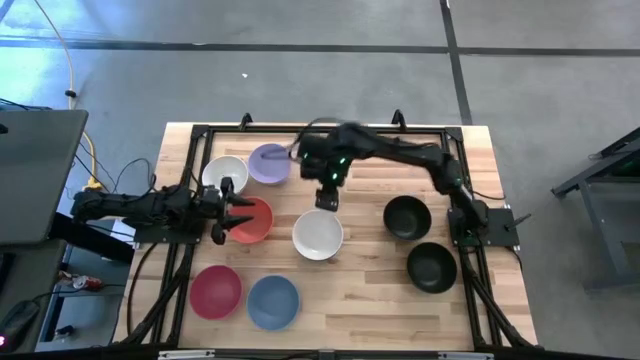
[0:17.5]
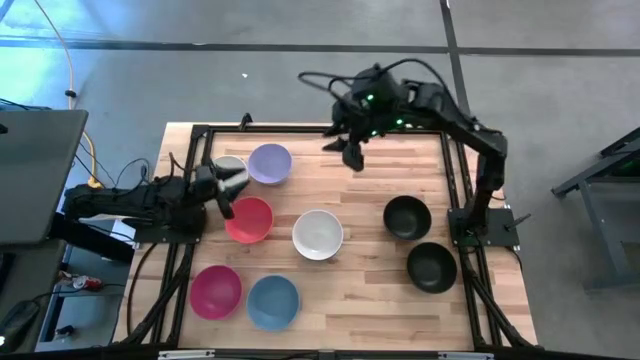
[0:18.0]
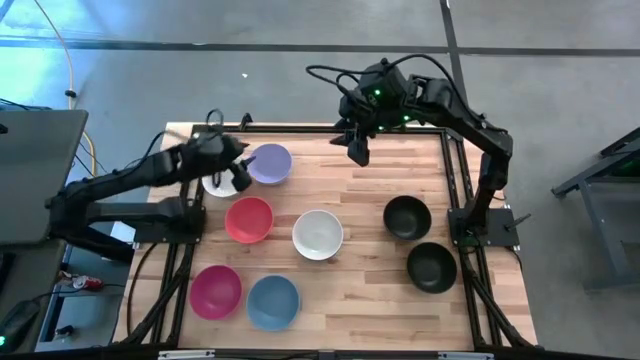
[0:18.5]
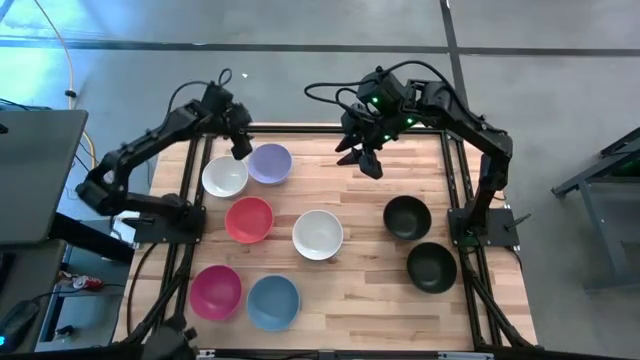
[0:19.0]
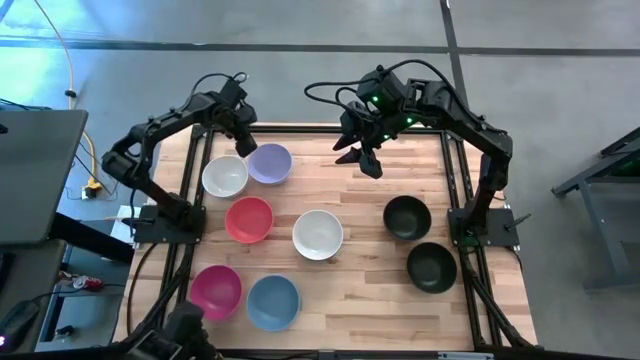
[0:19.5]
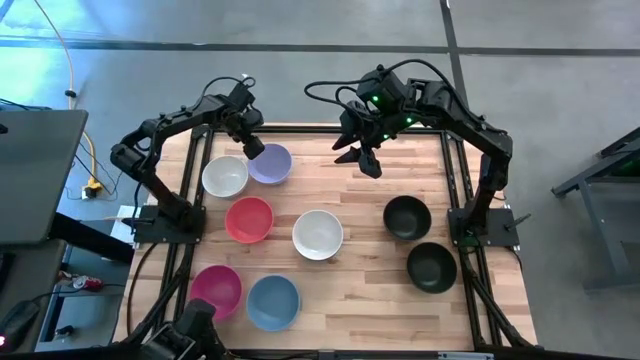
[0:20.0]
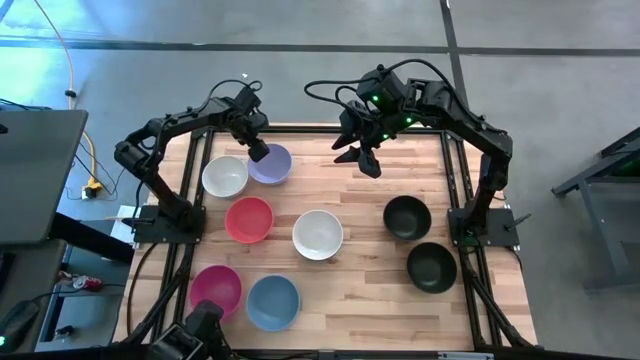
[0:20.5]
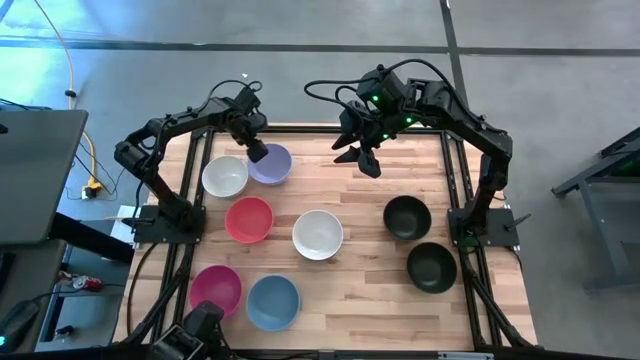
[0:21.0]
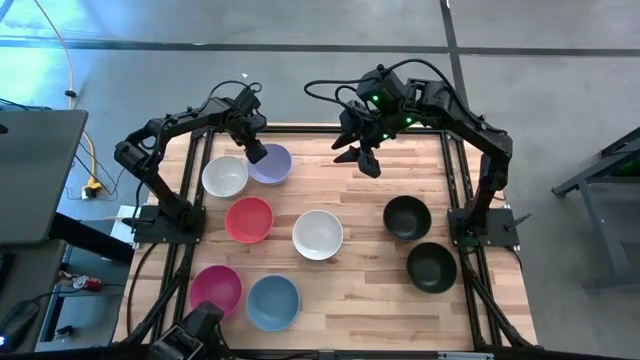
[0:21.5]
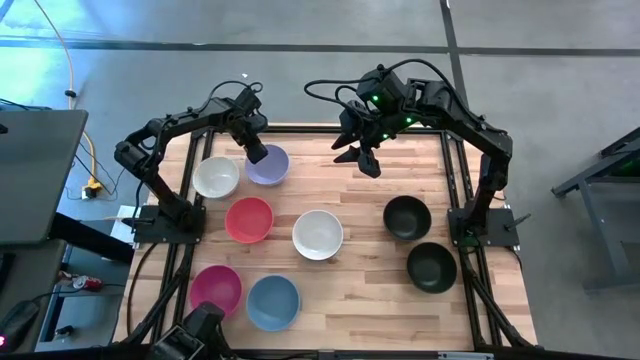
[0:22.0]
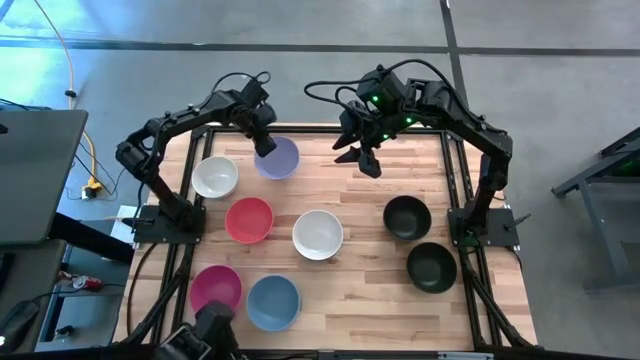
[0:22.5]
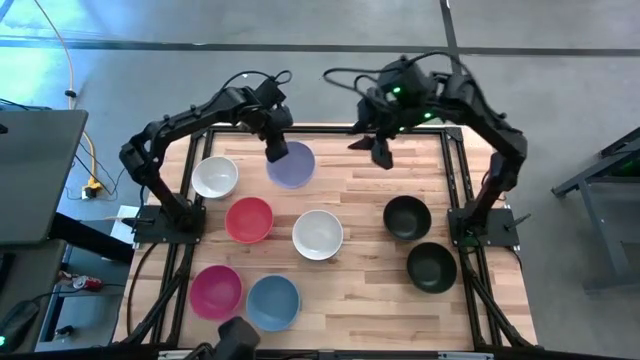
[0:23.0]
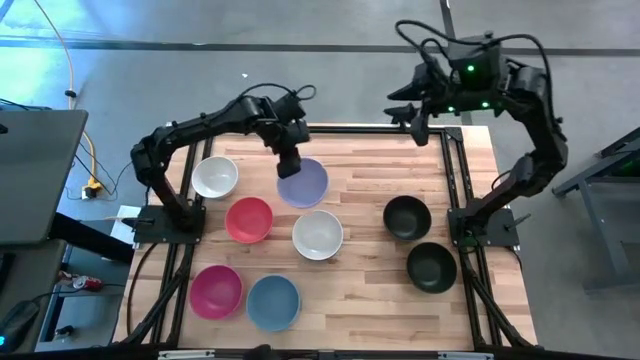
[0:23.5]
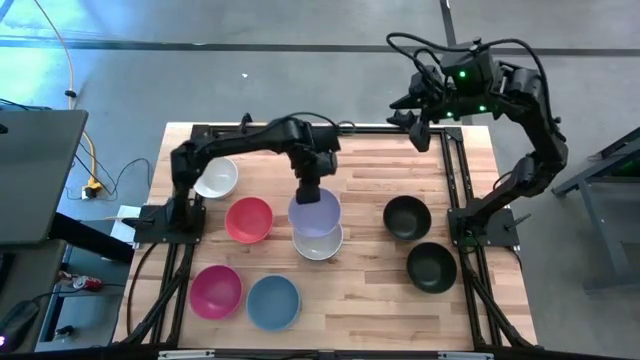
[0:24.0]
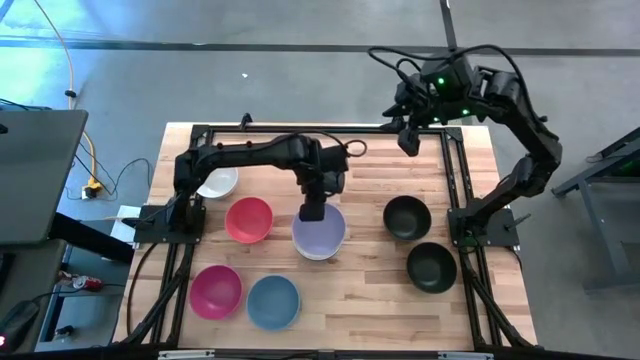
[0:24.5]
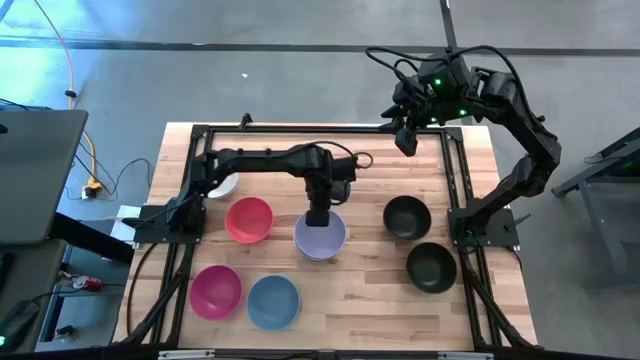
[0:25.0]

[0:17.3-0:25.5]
Task: Nest bowls inside each other
Stack the violet bowl on top of the white bowl

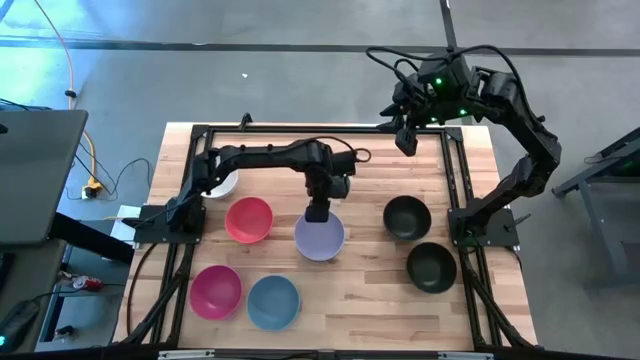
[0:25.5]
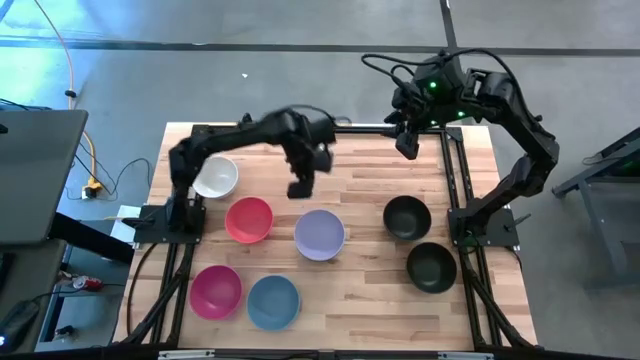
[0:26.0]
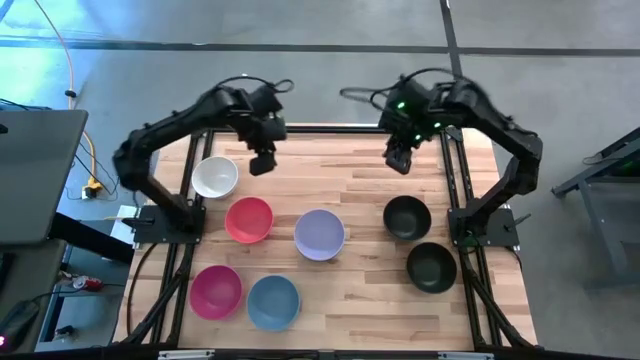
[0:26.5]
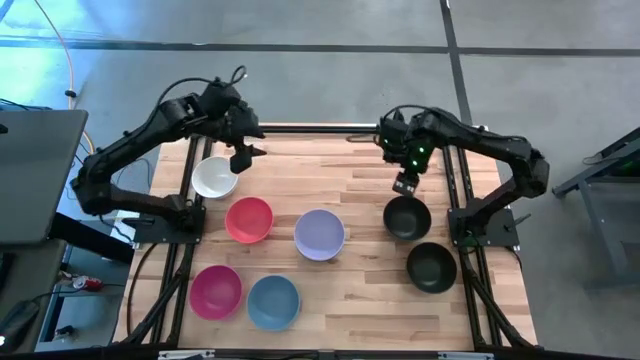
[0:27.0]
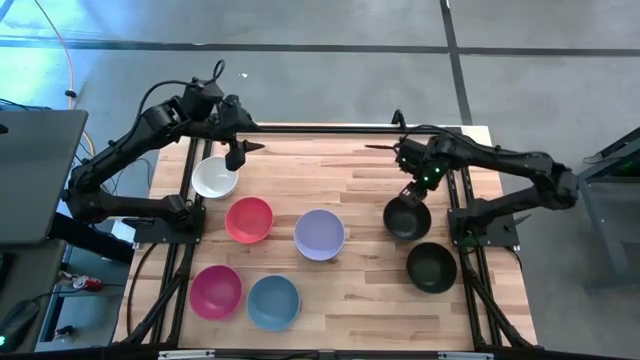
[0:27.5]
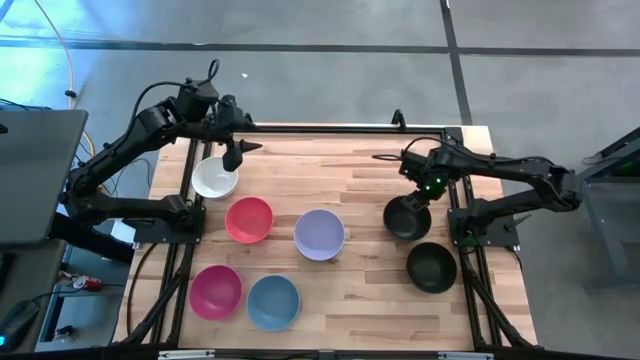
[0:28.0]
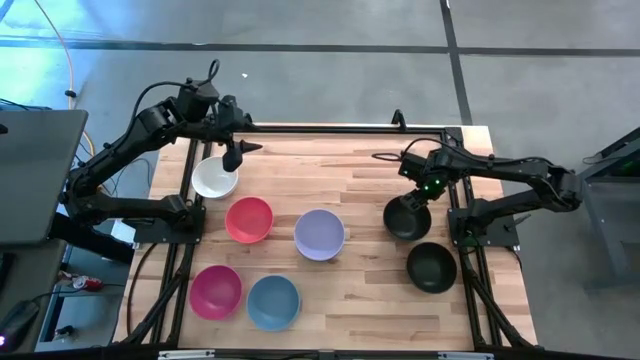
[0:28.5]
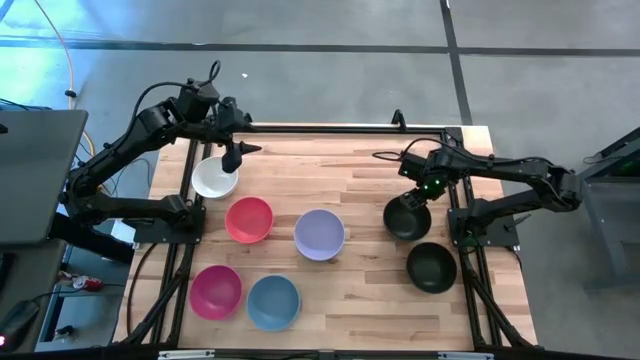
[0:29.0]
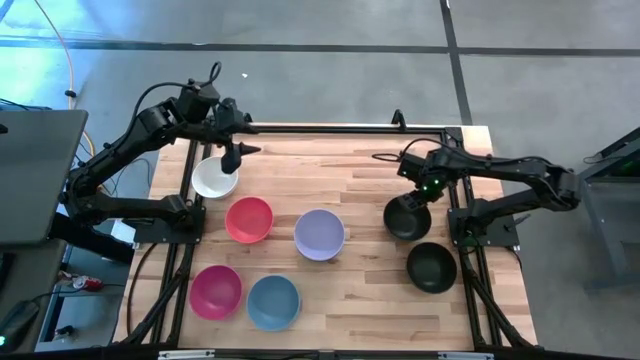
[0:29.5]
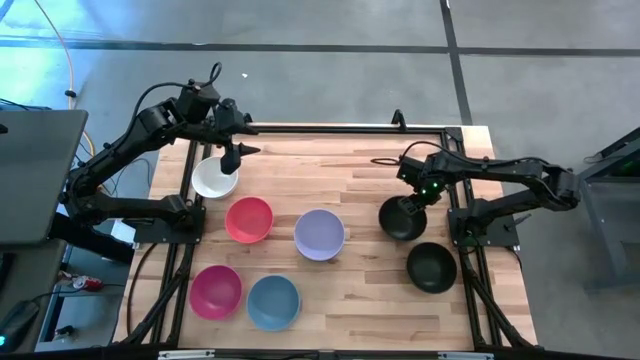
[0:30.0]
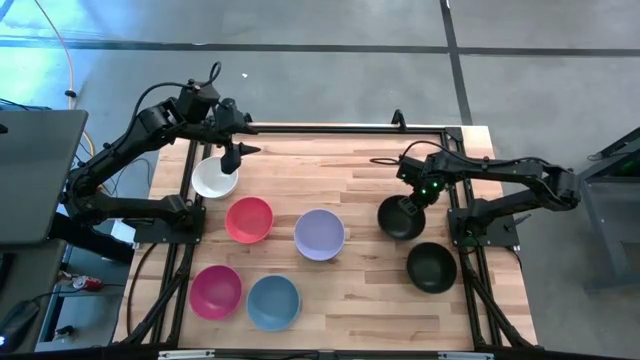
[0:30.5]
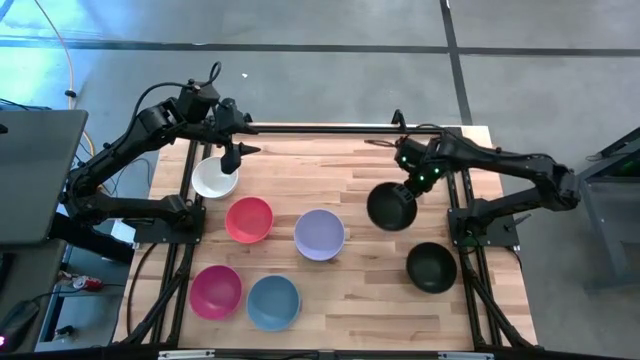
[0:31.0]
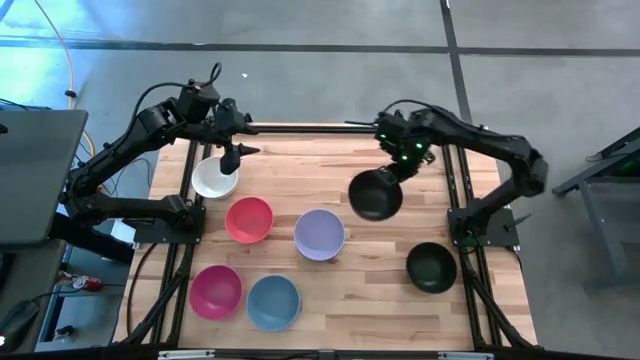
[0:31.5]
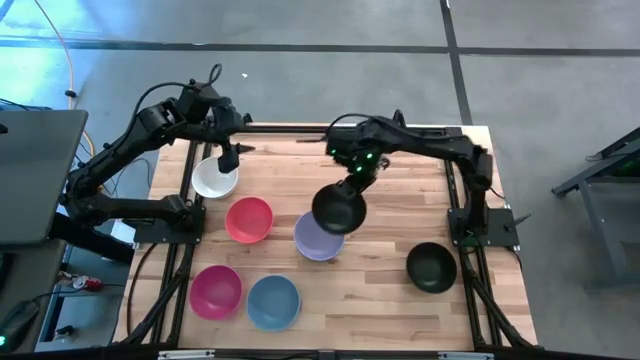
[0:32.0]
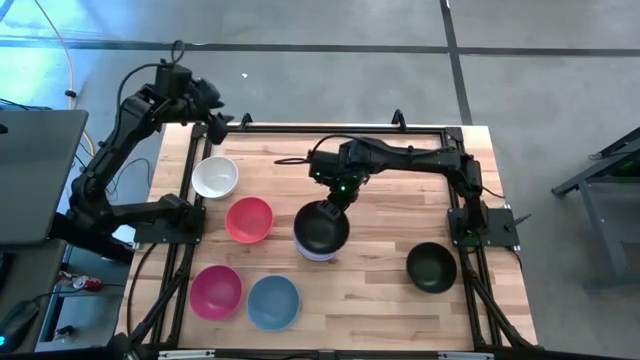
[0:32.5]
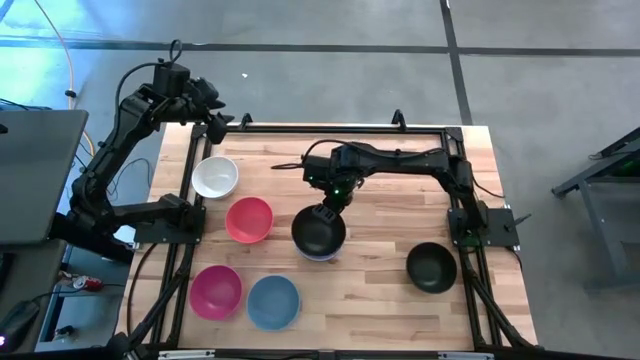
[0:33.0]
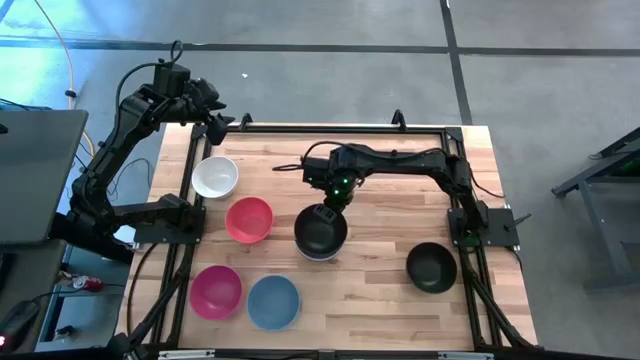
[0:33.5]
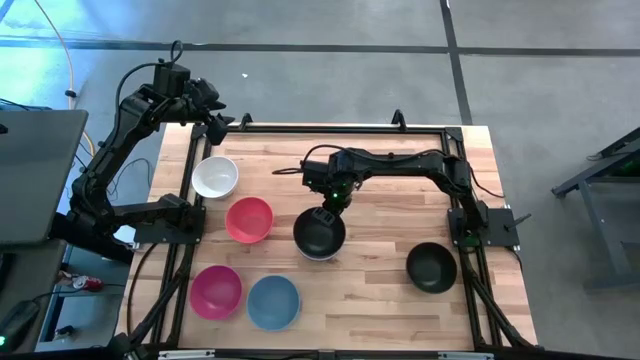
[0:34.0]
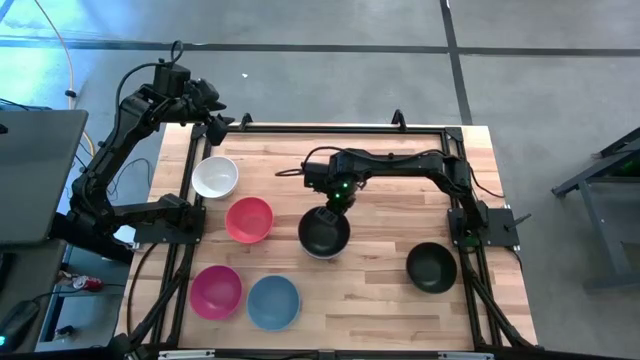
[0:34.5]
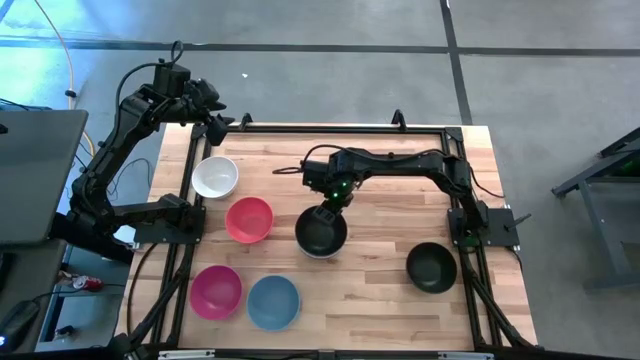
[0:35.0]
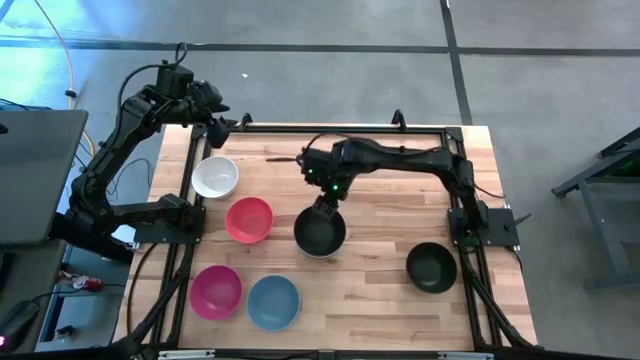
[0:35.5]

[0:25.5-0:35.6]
Stack the top black bowl on top of the violet bowl

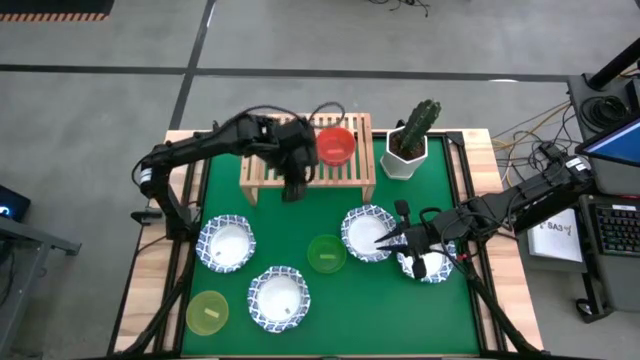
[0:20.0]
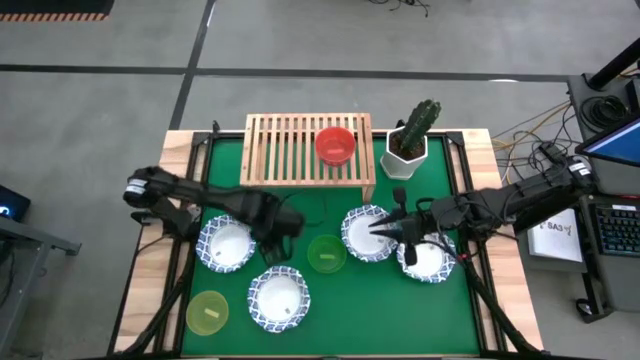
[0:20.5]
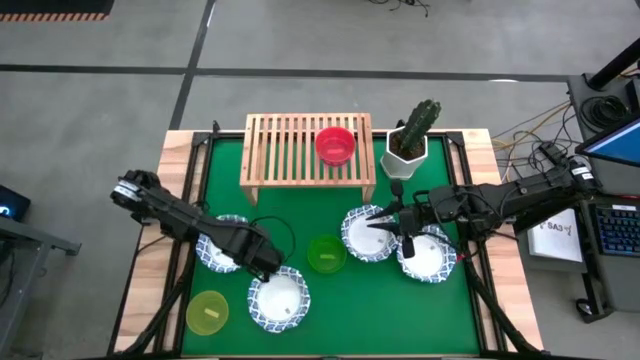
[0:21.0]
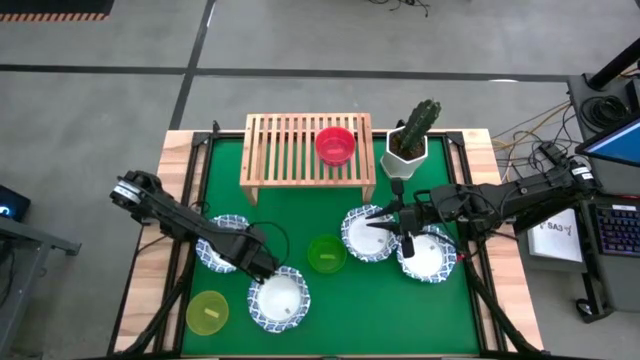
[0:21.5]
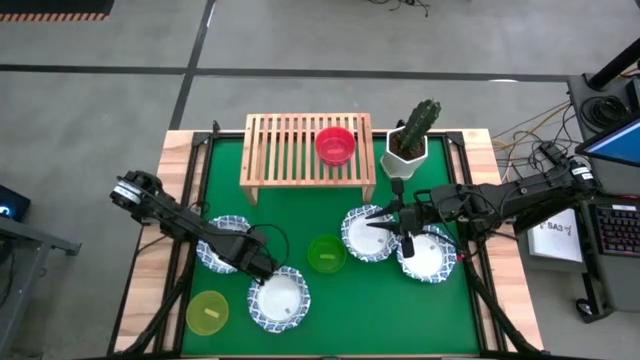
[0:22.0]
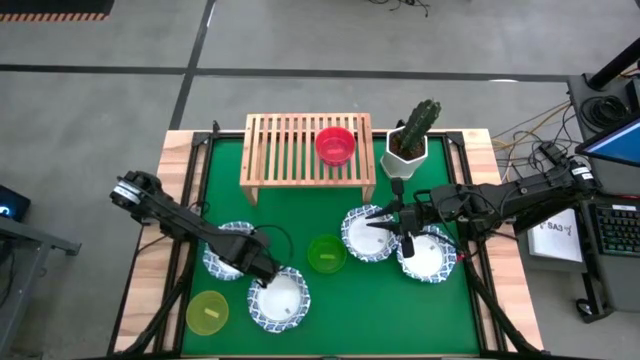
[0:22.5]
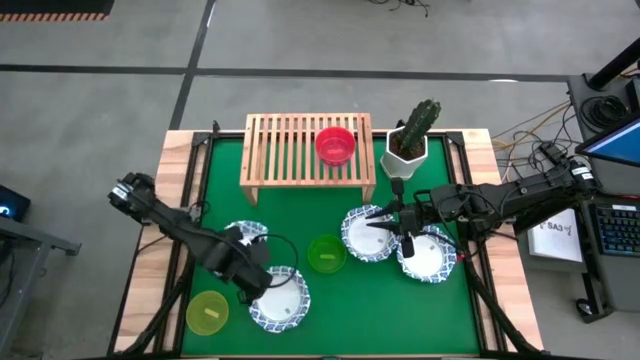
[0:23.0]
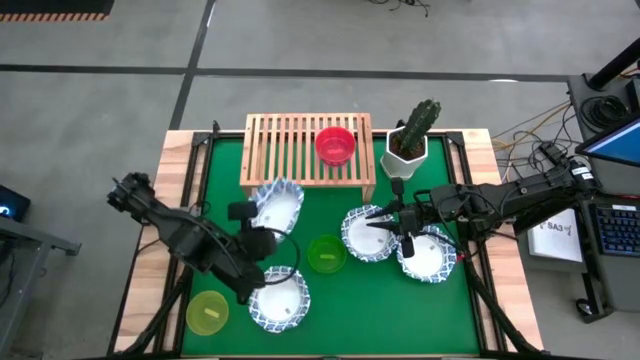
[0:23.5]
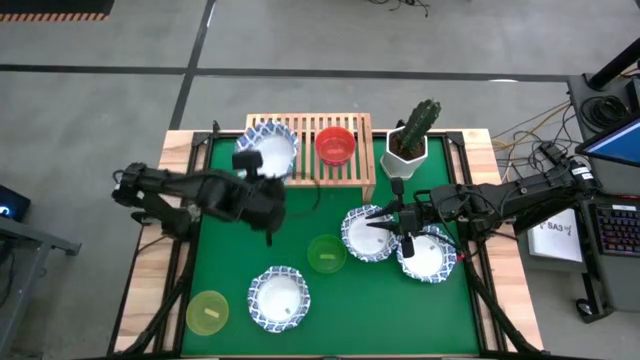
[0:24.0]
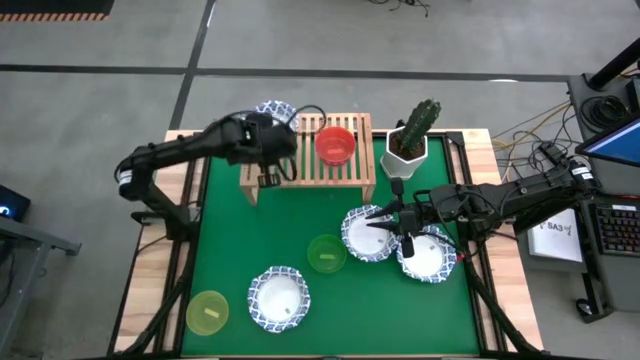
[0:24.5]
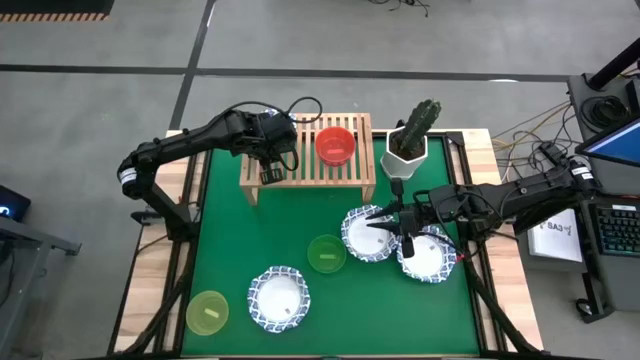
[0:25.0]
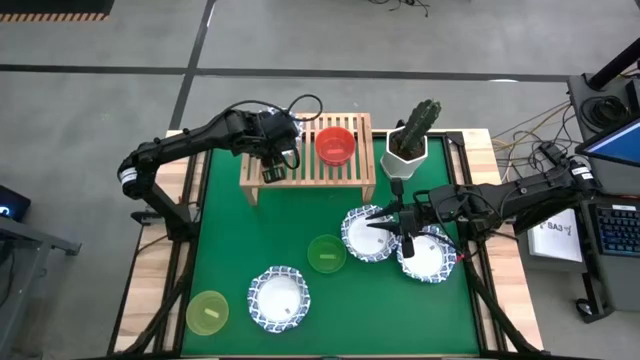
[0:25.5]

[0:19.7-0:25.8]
Task: Place and stack bowls onto a shelf
Put the top left white and blue bowl on the shelf
